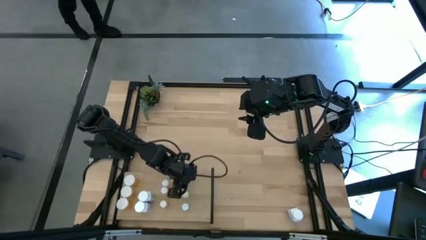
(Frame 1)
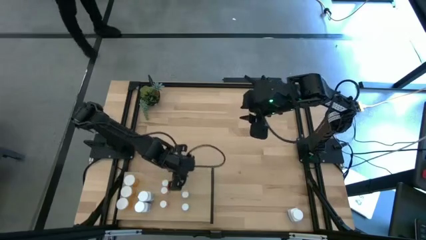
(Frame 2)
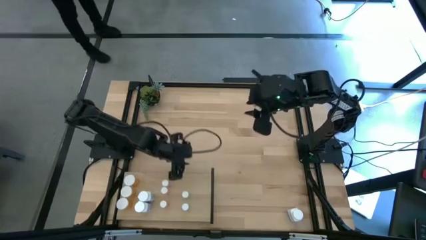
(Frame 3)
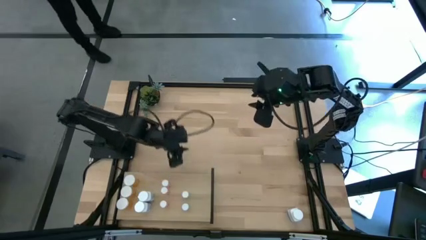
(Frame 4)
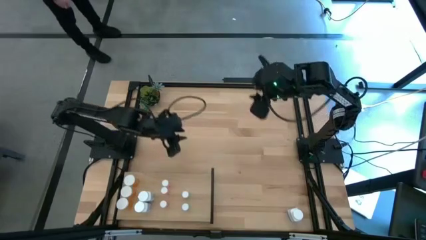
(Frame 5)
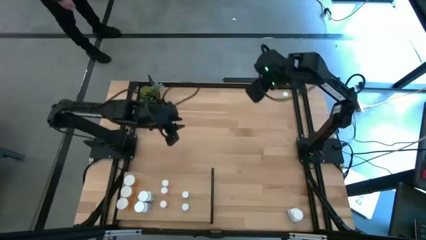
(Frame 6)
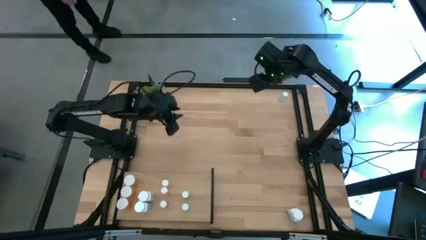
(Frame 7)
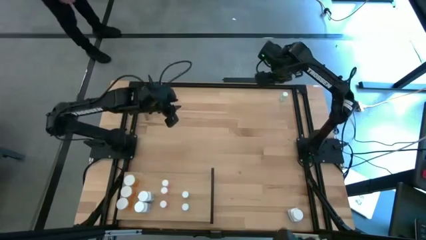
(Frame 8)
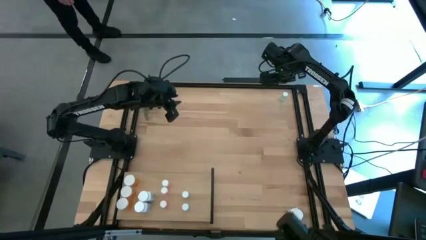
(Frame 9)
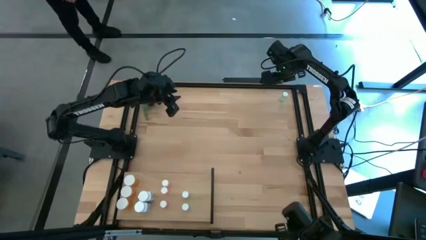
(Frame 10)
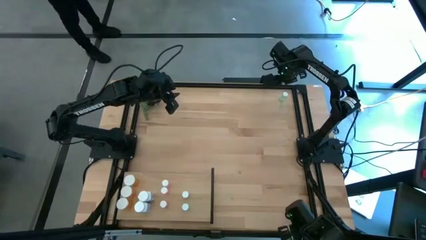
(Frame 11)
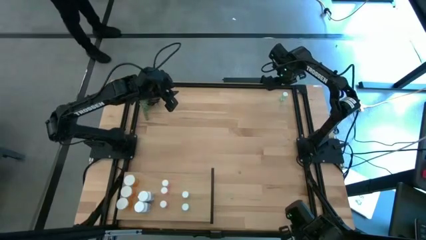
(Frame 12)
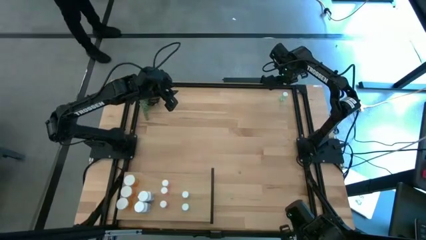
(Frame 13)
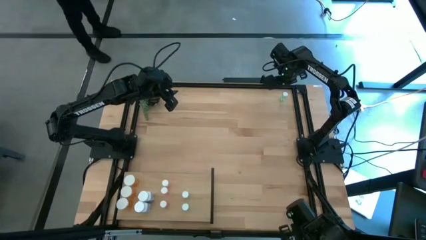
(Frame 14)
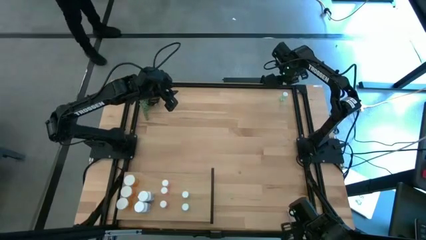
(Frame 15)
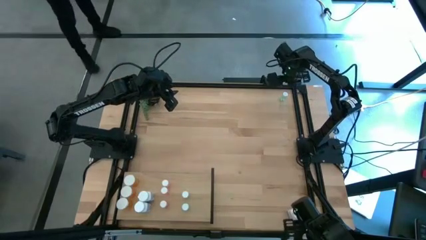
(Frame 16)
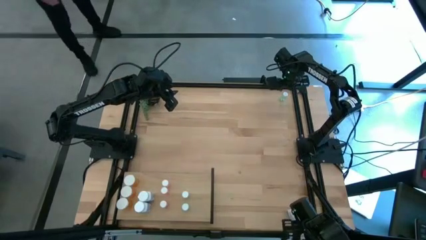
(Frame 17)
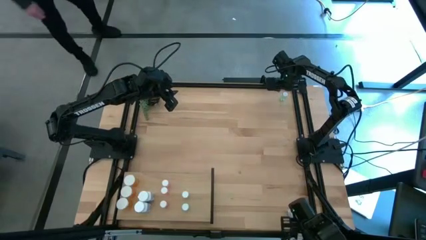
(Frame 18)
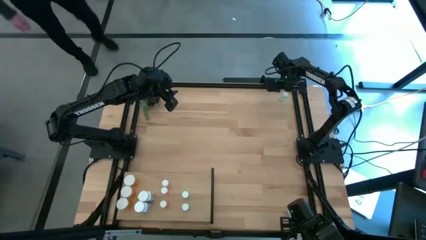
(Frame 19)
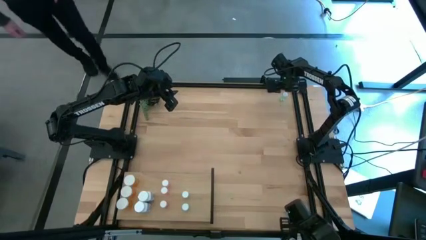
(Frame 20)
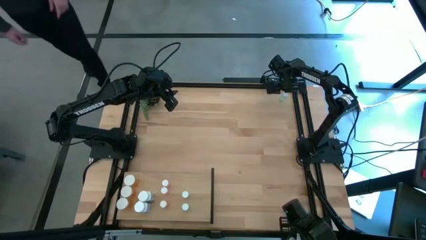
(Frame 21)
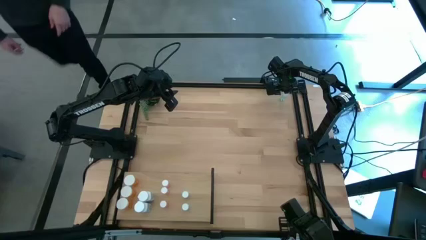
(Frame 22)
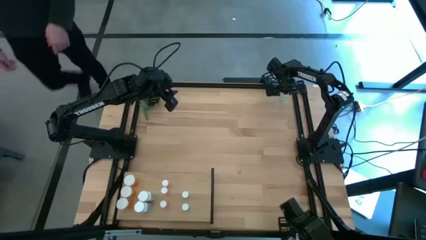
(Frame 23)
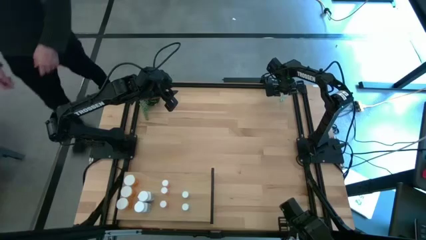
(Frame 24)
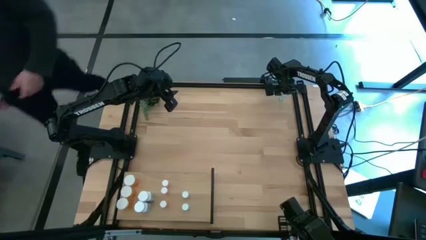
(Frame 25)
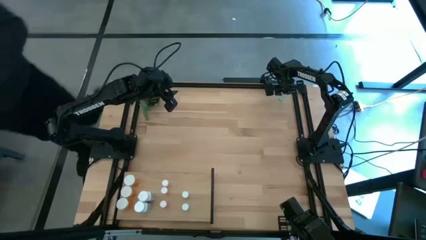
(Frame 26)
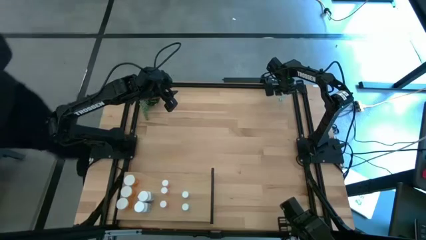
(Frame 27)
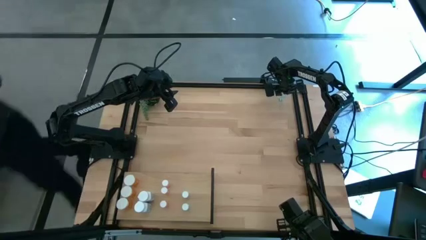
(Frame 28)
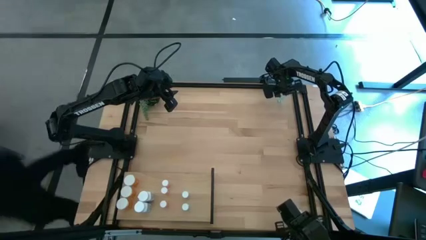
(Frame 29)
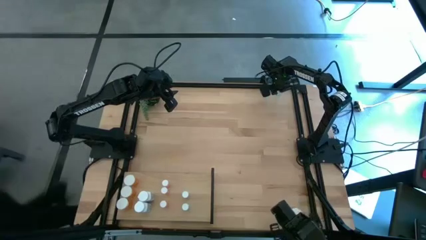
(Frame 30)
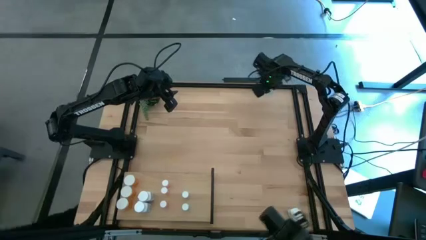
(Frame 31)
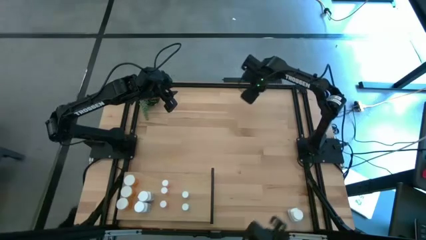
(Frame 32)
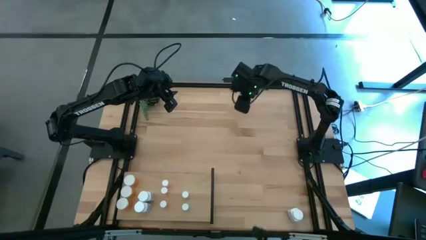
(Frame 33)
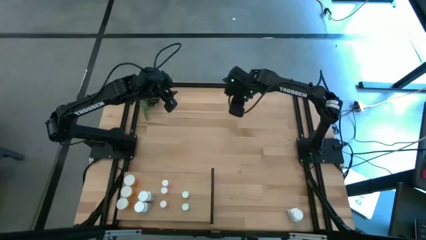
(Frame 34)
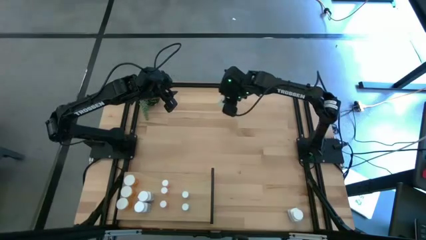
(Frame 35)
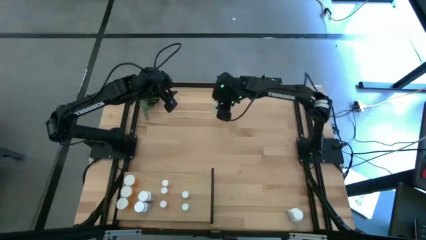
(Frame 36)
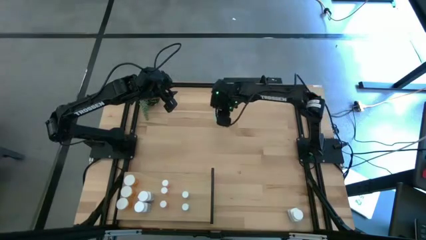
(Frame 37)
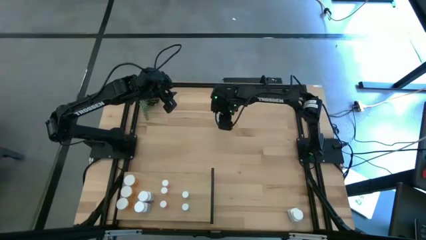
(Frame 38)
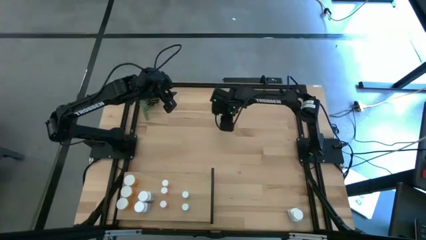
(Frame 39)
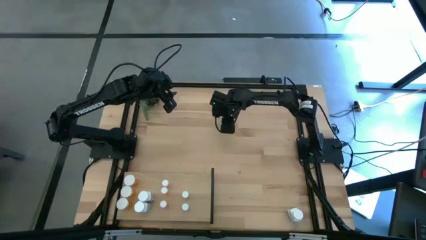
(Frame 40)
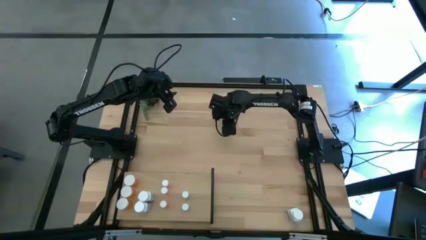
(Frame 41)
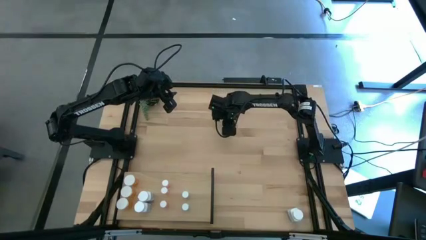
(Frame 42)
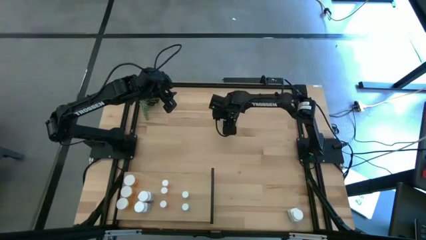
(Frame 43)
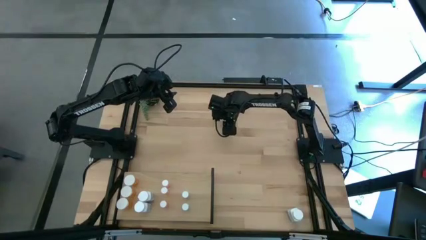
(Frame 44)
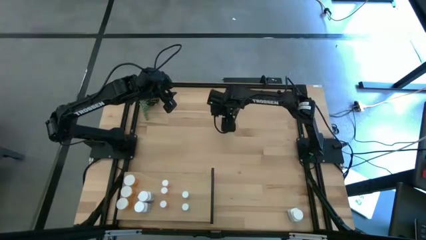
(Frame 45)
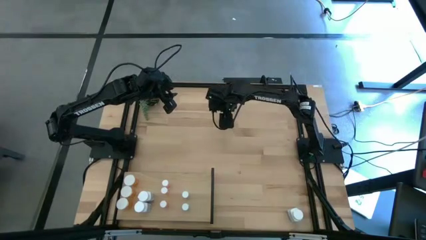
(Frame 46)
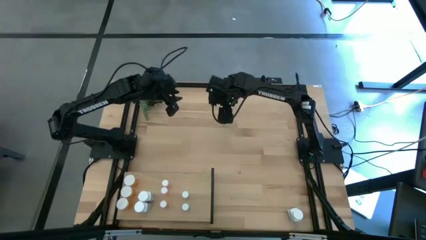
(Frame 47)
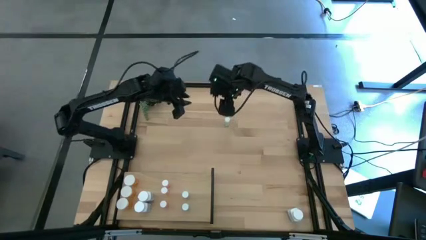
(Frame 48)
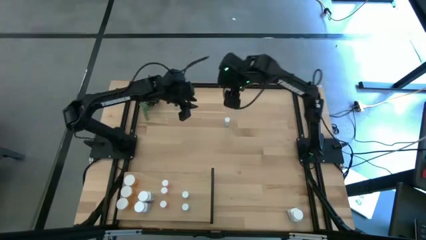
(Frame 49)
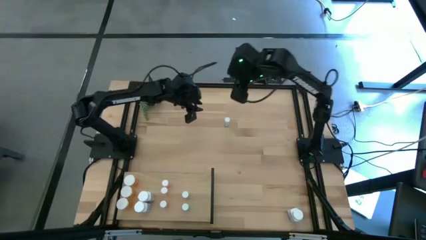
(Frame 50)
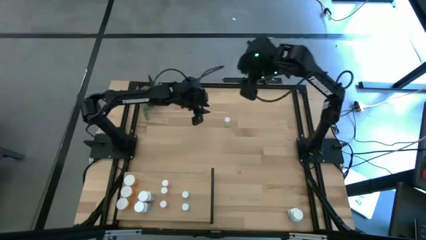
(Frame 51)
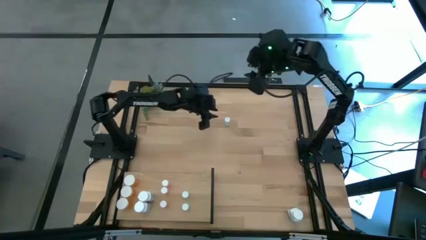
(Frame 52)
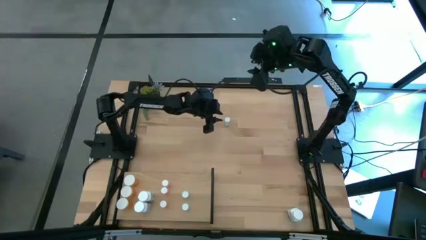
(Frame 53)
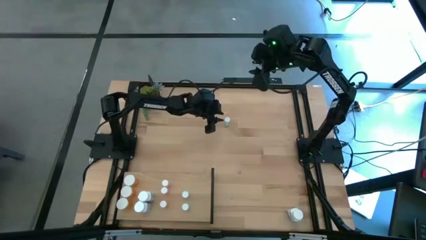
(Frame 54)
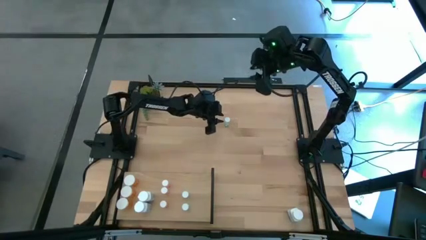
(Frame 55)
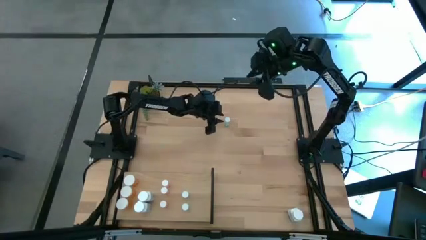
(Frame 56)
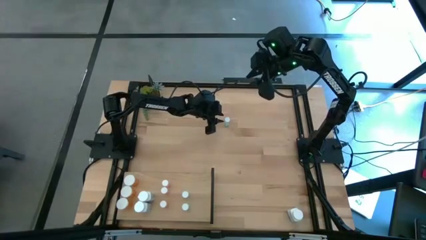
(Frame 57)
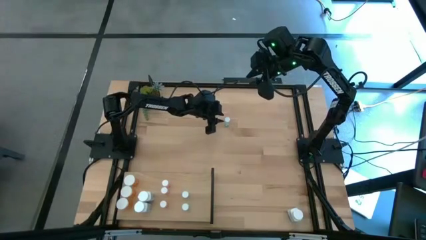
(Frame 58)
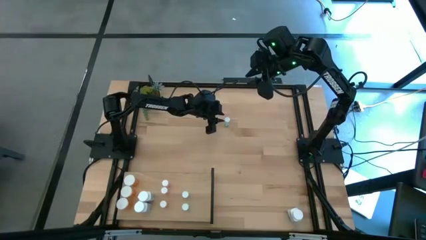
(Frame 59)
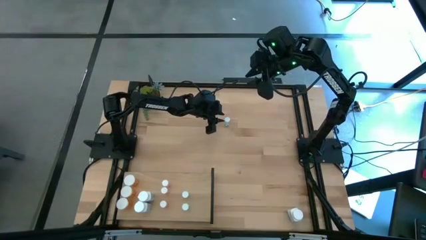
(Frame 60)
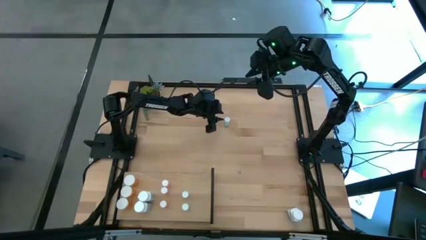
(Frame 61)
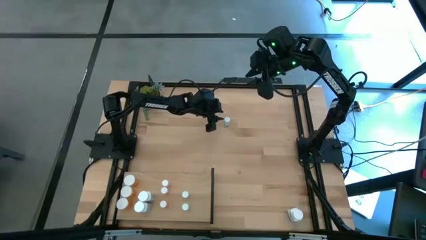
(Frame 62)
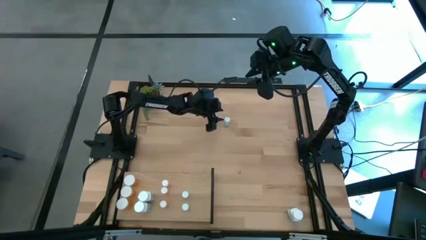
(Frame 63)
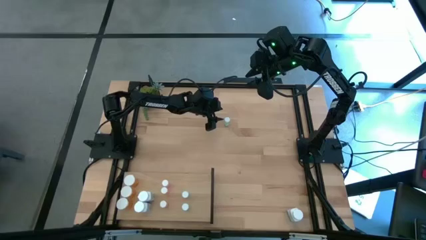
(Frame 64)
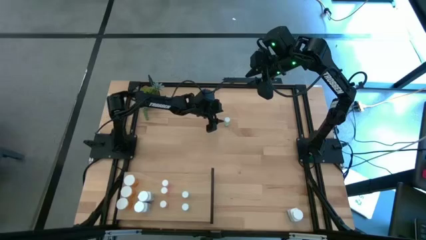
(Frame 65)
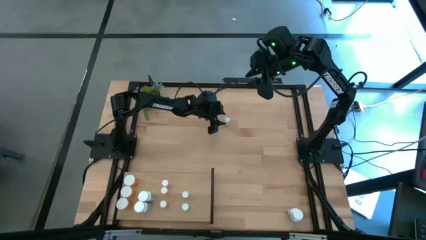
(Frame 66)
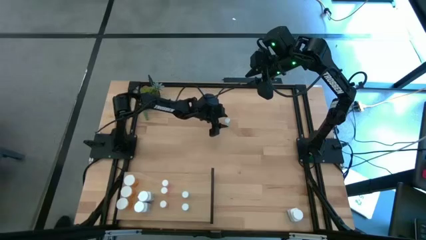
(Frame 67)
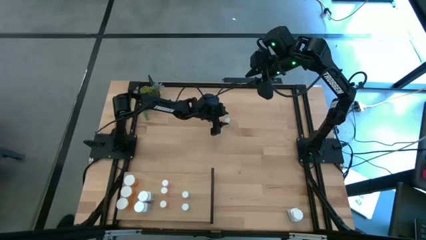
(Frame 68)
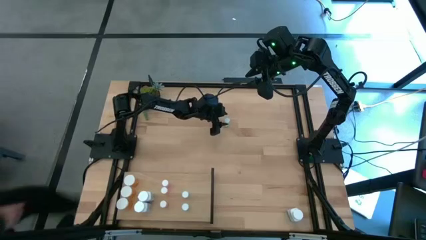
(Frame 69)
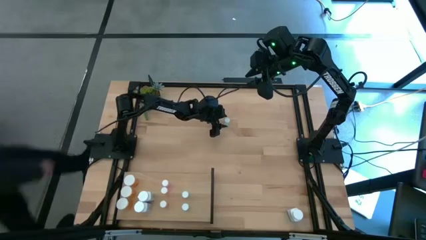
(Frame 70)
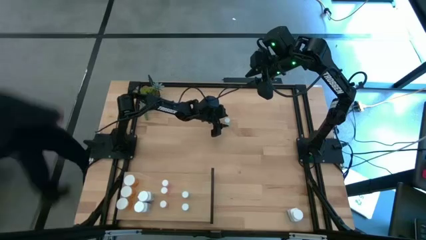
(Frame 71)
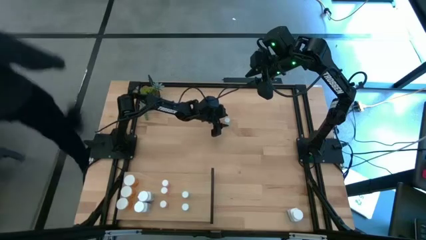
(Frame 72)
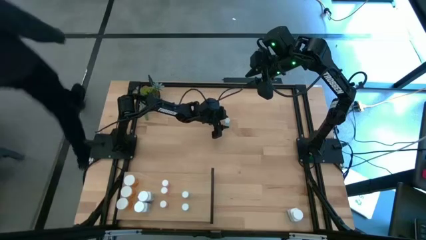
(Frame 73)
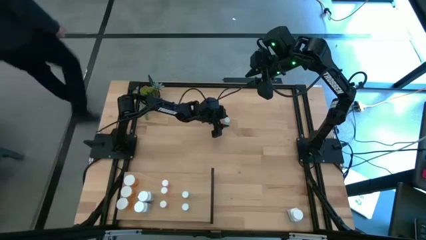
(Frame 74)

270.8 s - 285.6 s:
Task: Pick and place medicine bottles onto shelf by color
Put the small blue pill bottle on the shelf aligned with the other small blue pill bottles
